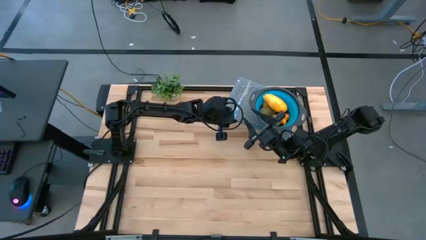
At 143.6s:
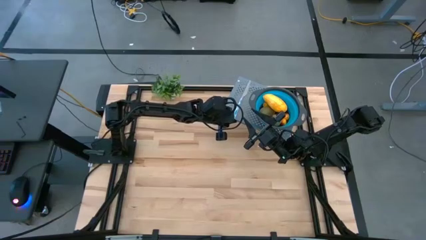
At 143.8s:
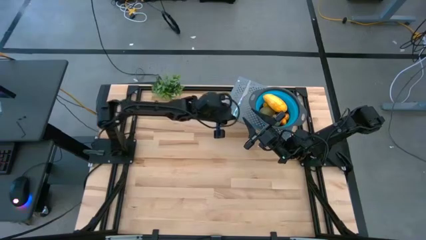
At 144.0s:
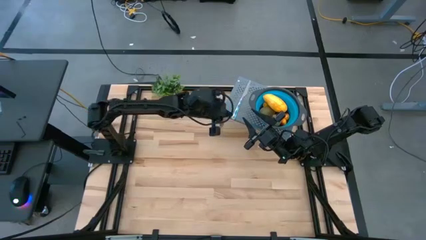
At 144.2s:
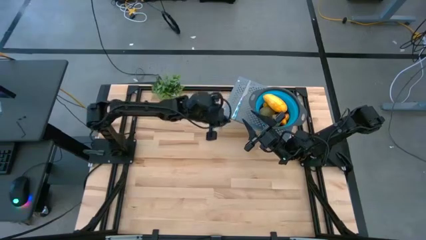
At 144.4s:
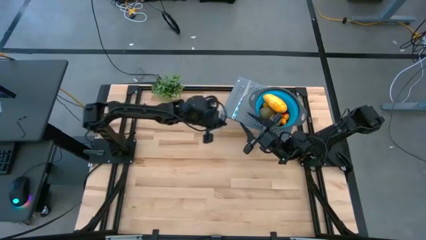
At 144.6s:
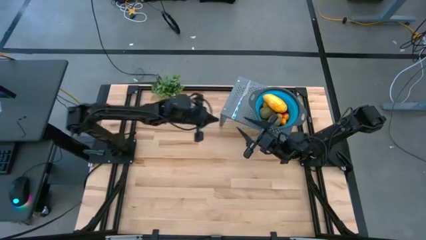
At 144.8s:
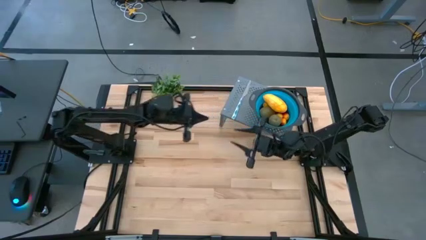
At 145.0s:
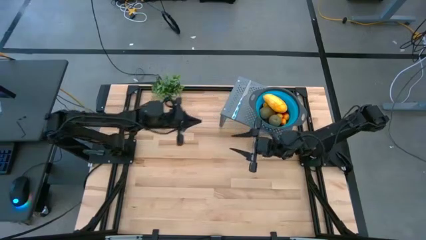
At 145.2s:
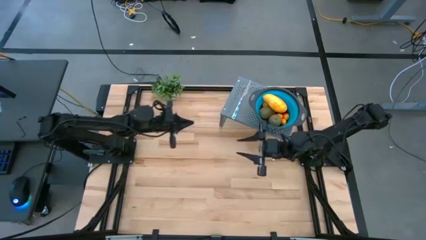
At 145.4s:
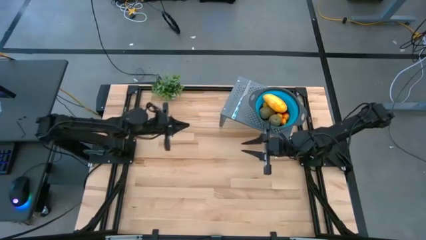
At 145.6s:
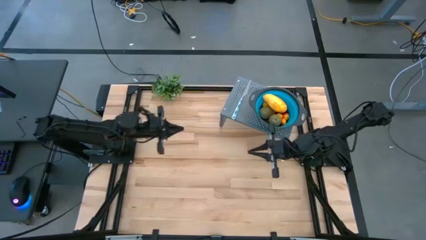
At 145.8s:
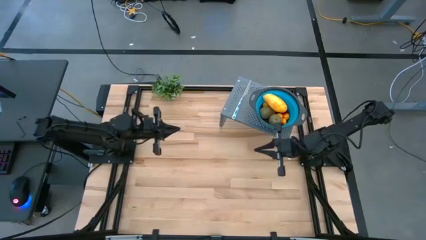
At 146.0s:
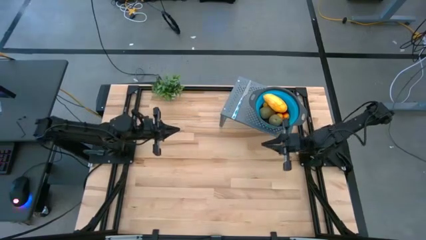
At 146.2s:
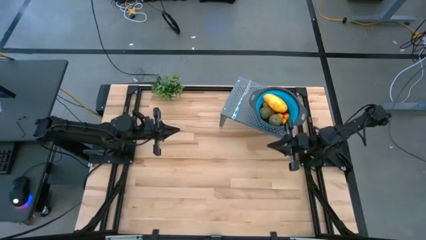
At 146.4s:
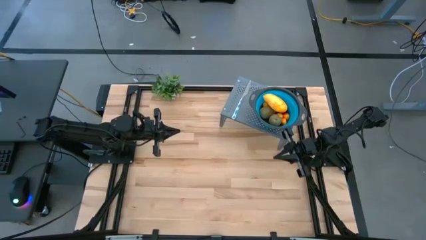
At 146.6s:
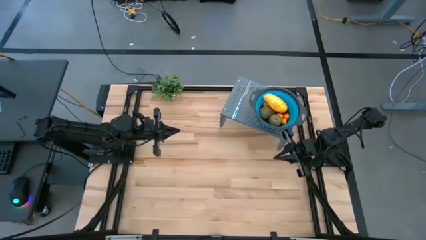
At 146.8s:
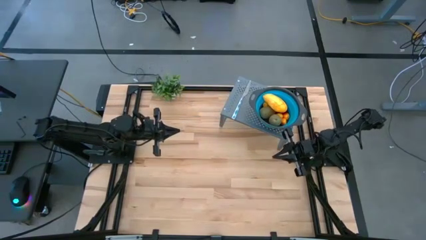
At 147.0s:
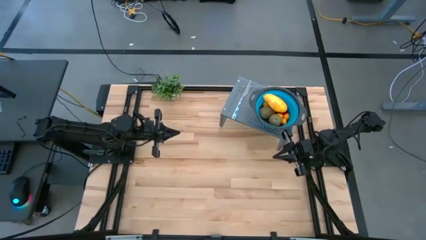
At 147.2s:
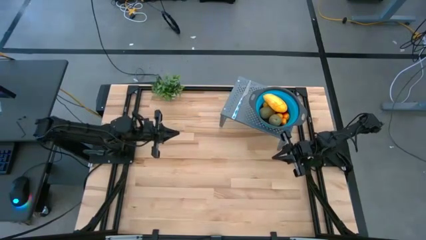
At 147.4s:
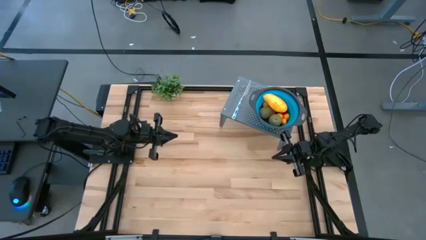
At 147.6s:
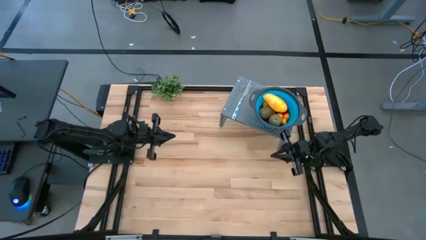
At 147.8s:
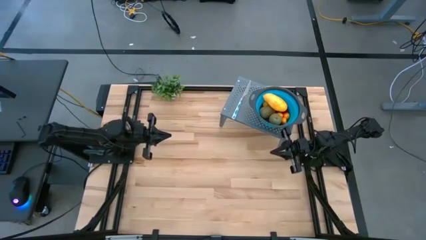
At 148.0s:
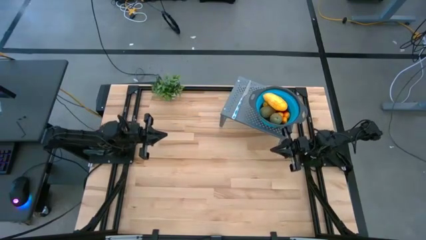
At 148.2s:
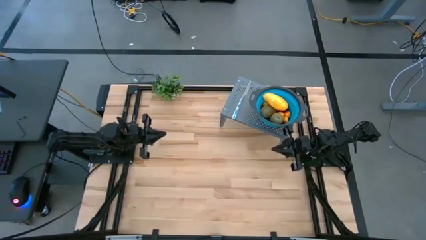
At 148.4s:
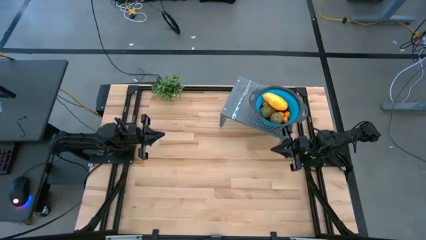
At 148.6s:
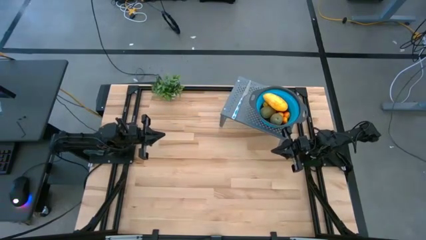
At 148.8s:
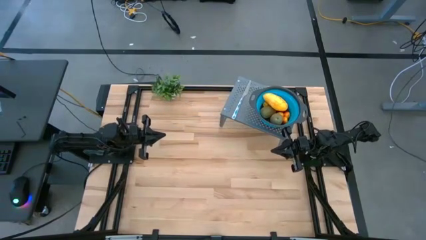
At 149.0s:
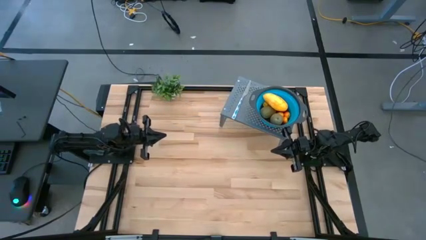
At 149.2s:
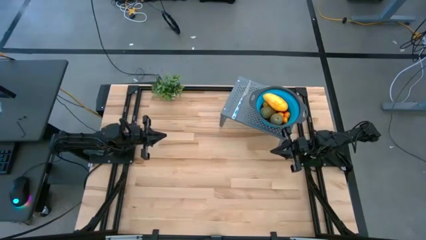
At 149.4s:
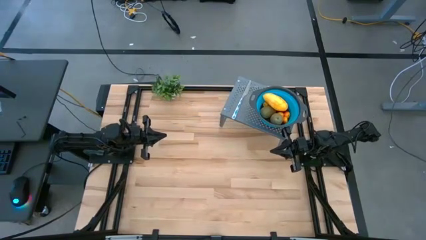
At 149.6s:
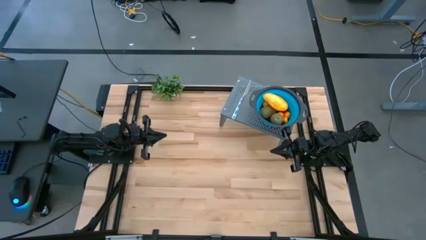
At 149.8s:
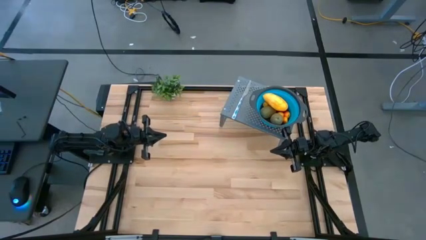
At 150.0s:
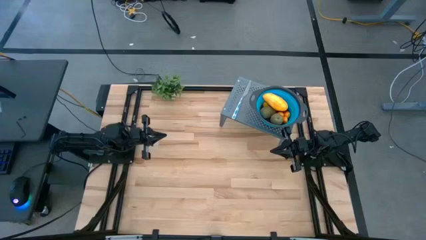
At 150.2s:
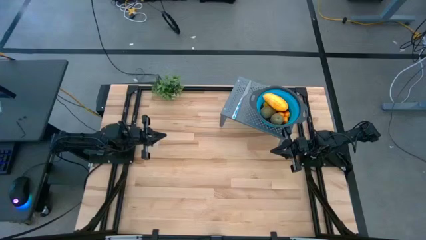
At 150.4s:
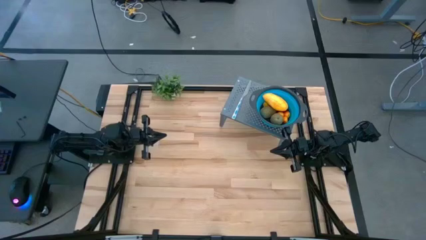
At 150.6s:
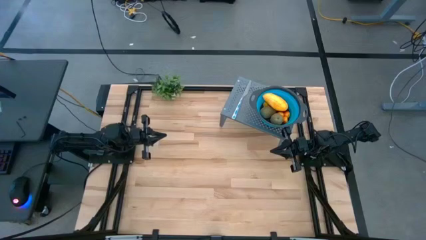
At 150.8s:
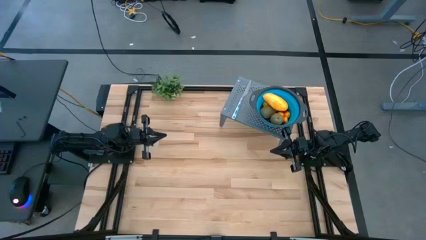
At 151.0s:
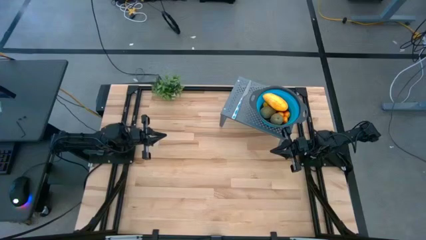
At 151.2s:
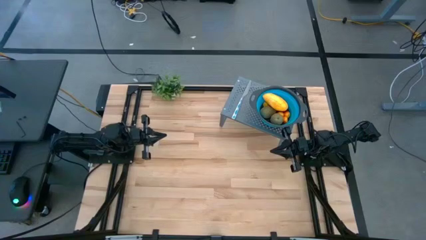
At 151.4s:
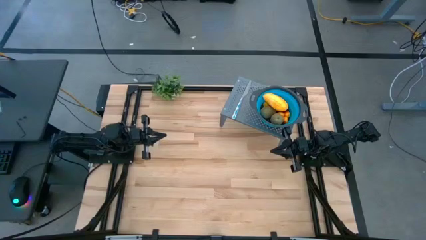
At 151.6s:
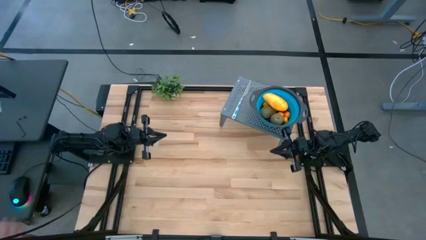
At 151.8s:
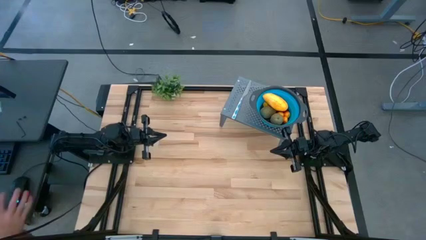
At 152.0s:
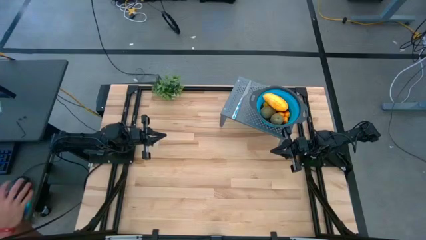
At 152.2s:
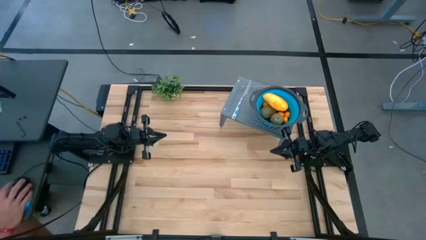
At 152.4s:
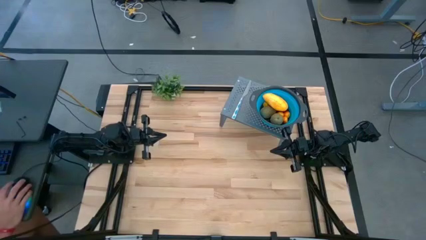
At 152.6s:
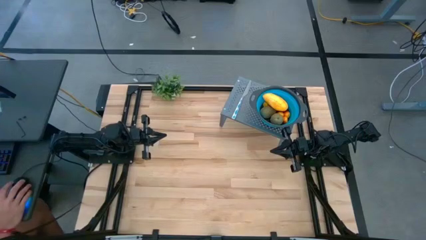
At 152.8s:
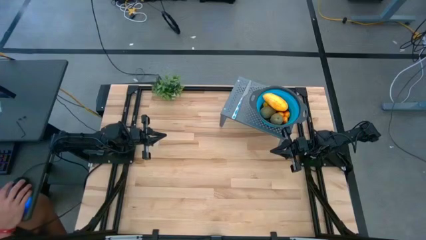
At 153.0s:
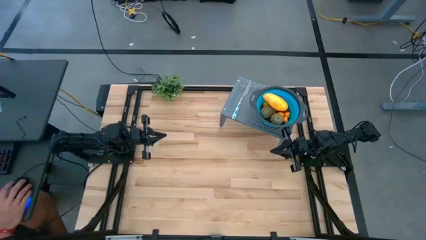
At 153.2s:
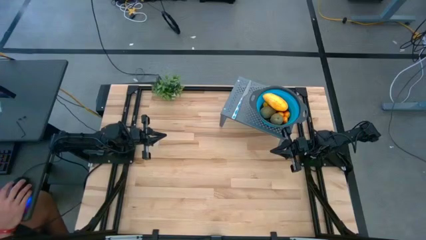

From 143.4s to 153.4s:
Task: Pick & Place Fruit
Return to Home Position

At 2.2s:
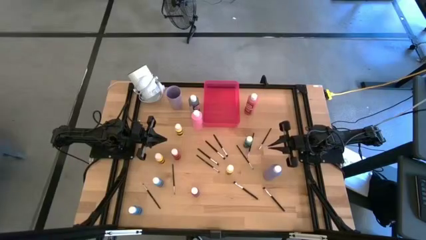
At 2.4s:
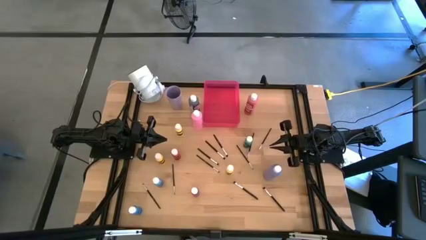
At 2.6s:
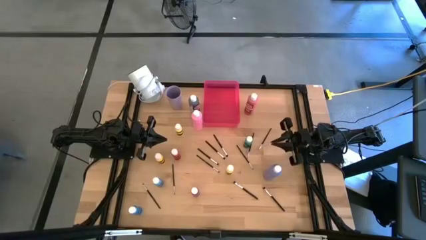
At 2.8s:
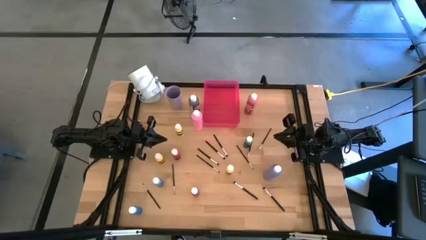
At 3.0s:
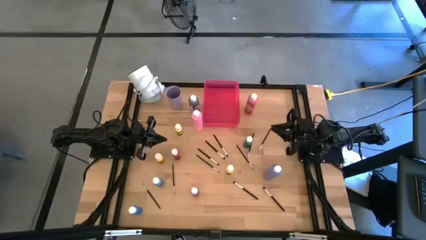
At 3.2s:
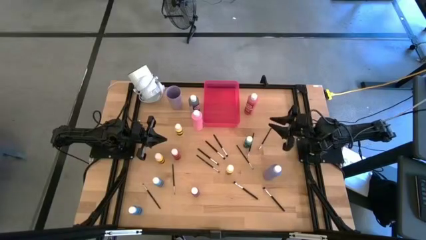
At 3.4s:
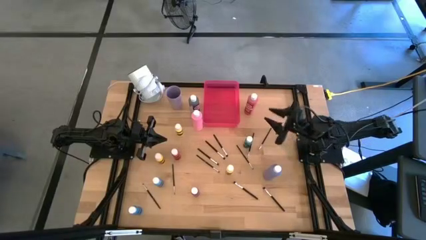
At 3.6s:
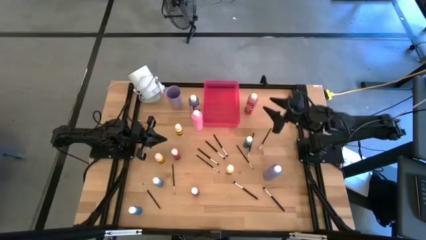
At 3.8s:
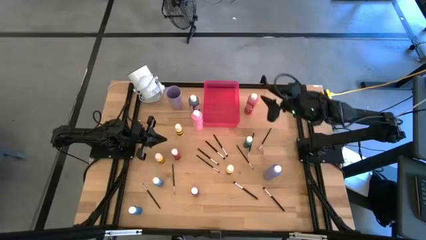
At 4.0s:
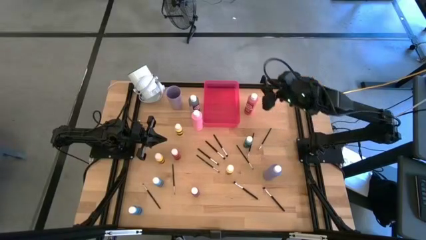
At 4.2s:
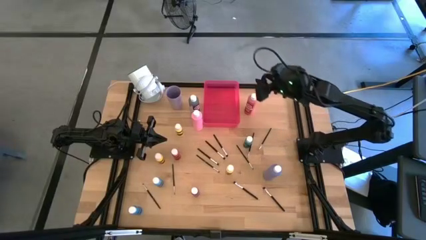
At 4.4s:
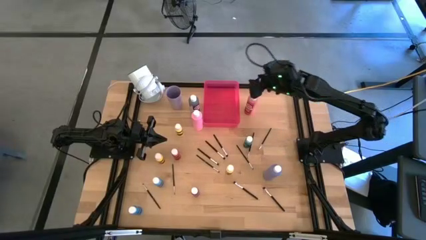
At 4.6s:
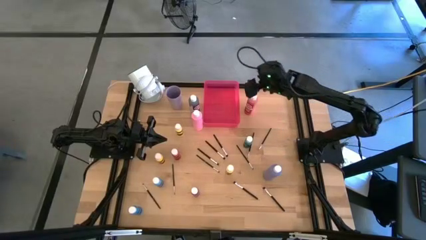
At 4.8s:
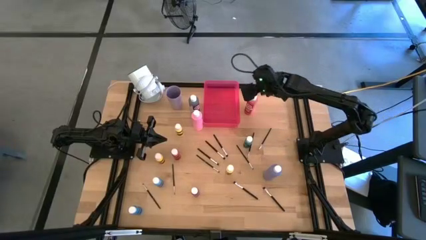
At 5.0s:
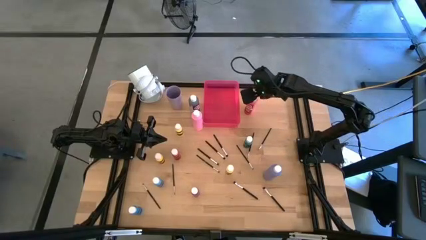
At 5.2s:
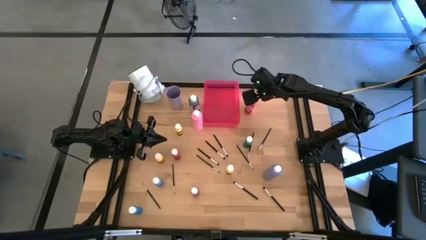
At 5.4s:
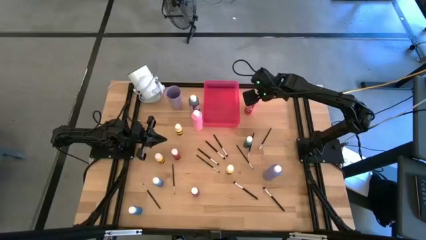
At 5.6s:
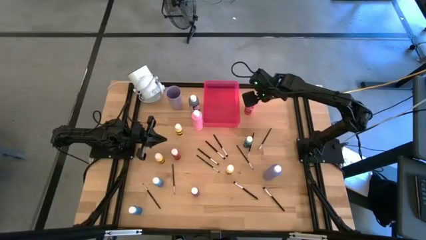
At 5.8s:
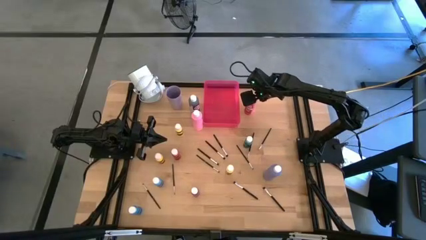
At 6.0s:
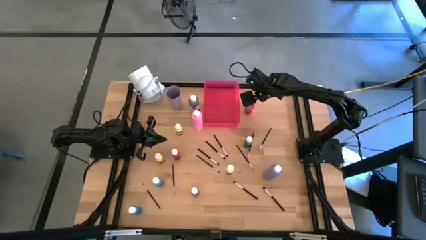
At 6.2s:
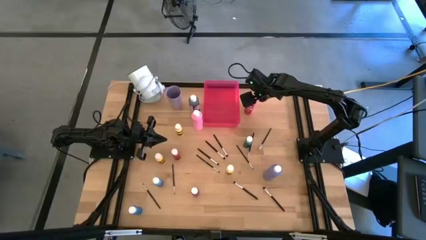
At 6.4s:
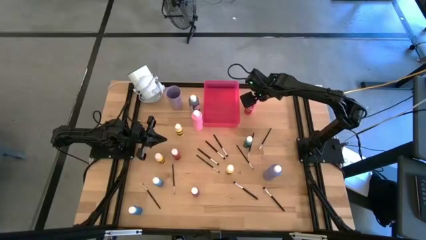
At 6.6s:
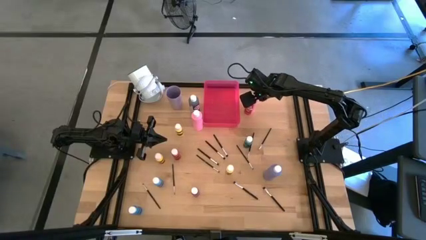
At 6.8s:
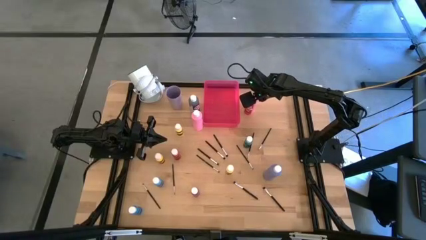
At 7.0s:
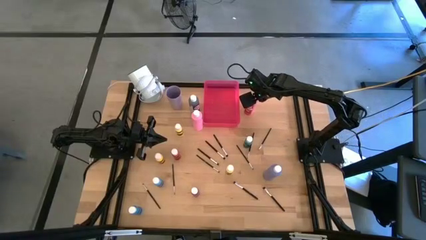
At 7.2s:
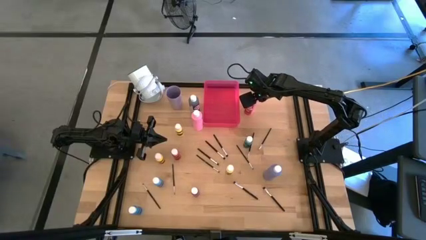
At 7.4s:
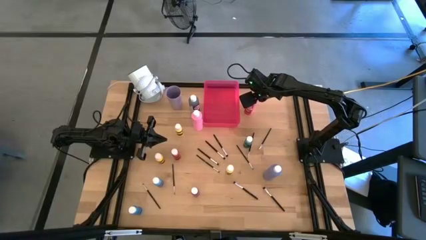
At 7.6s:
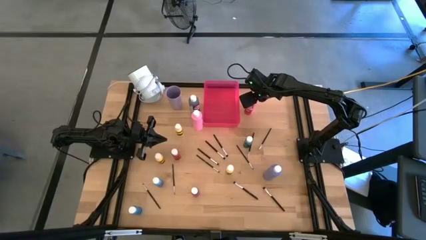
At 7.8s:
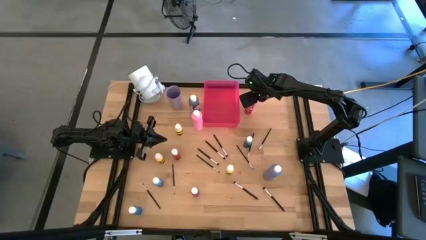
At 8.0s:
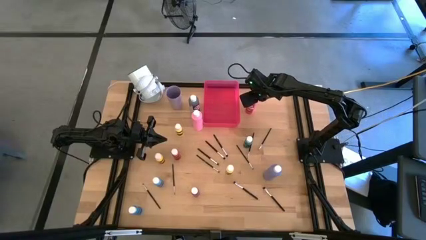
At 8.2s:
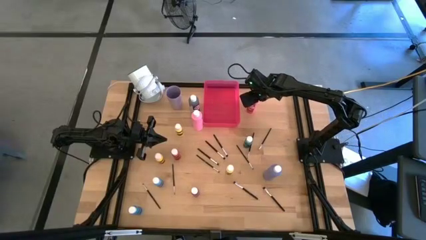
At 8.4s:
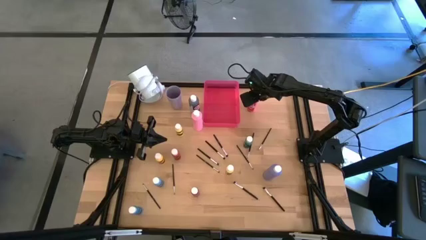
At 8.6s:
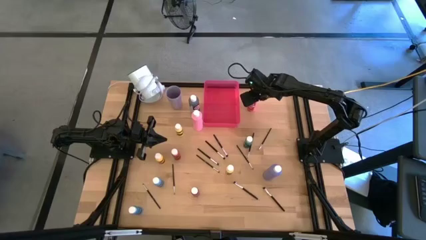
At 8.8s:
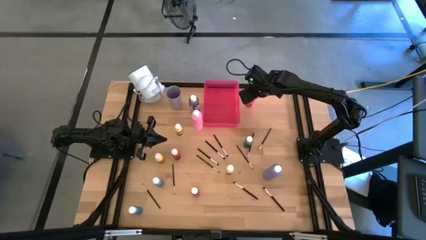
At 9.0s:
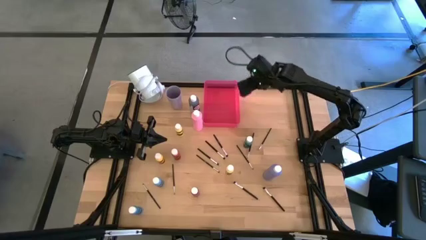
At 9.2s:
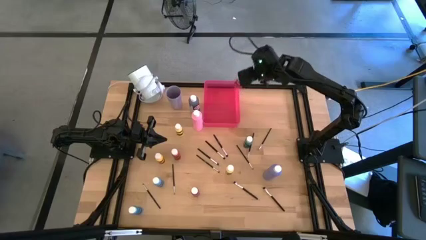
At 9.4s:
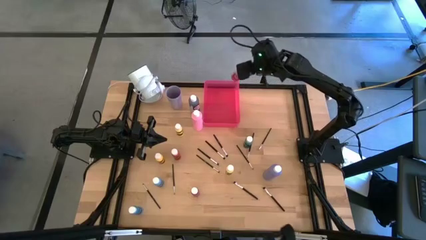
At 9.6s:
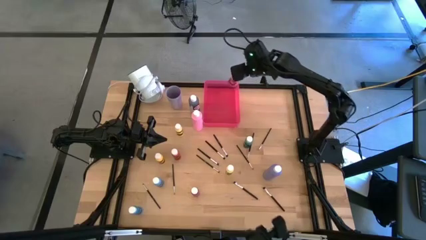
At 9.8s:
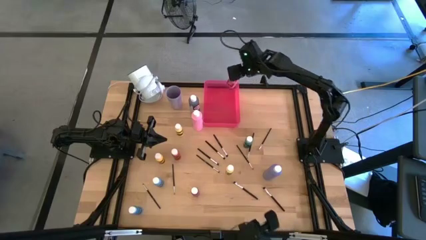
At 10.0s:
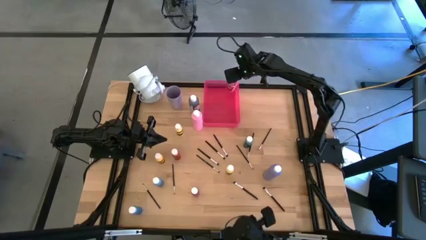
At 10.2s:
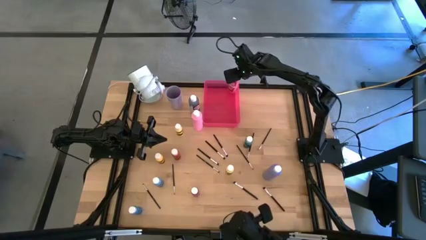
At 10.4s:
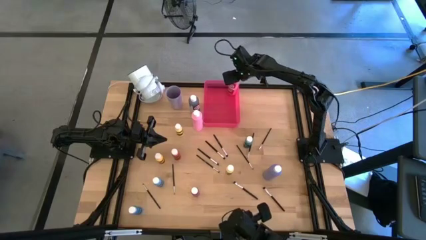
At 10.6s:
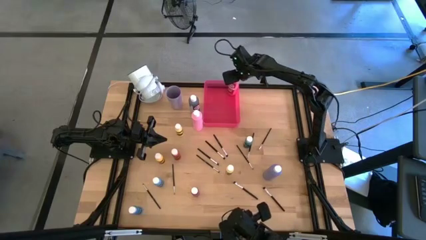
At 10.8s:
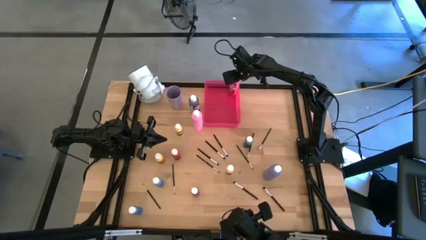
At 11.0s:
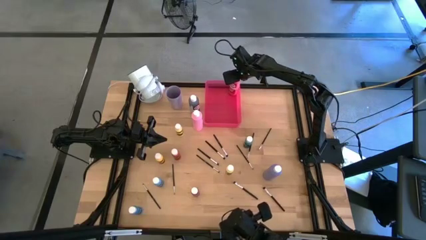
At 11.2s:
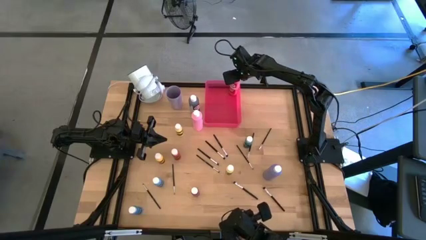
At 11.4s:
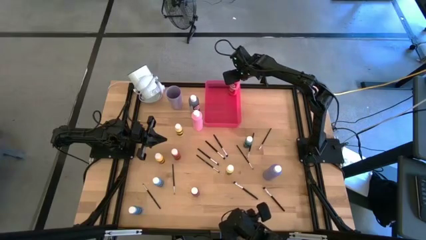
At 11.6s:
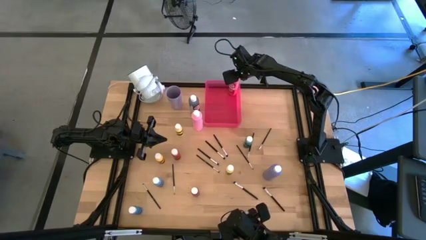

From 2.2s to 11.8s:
Task: Pick & Place Paint Supplies
Put the dark pink paint bottle into the red bin
